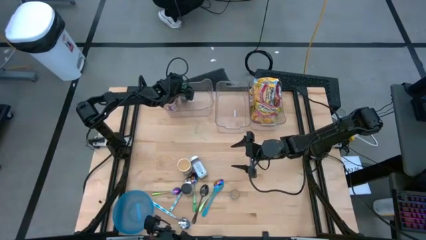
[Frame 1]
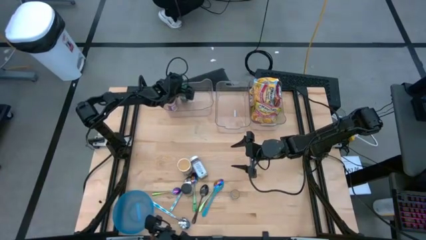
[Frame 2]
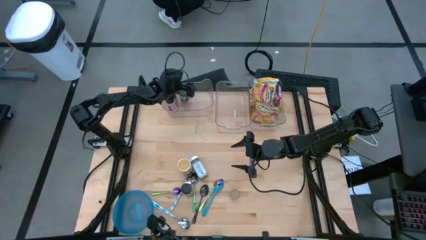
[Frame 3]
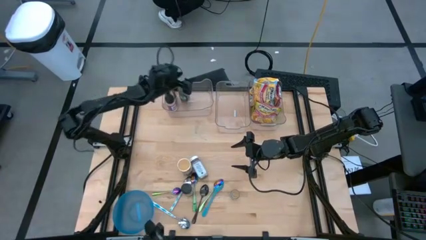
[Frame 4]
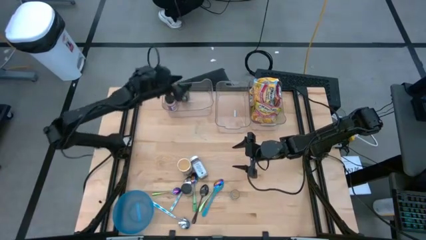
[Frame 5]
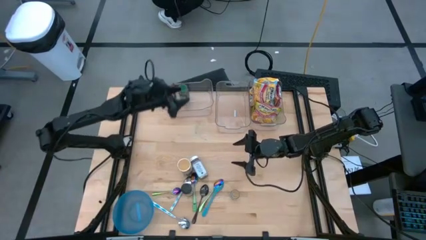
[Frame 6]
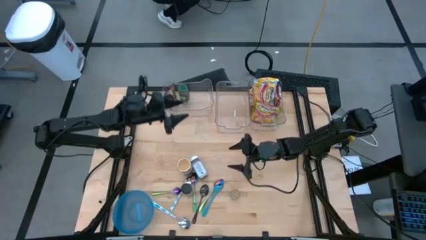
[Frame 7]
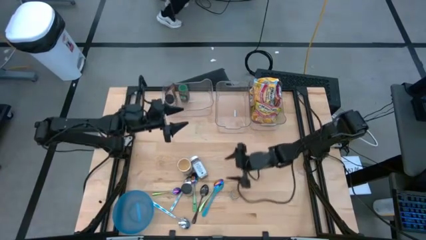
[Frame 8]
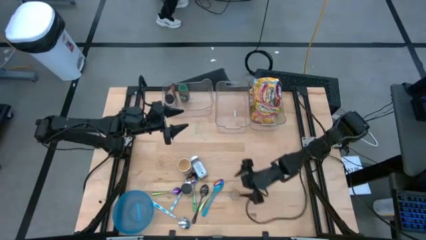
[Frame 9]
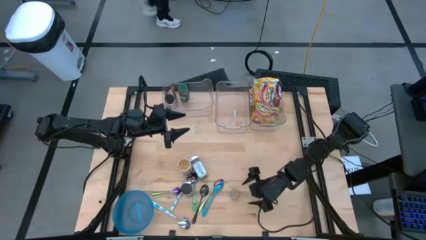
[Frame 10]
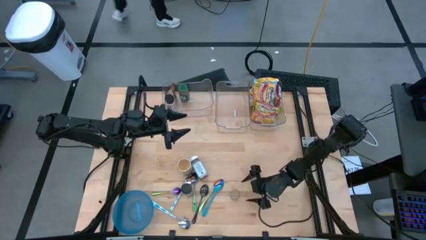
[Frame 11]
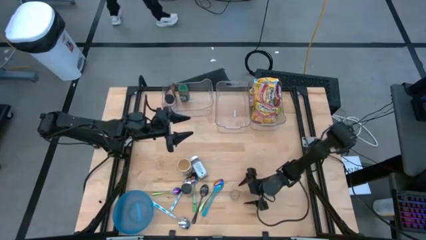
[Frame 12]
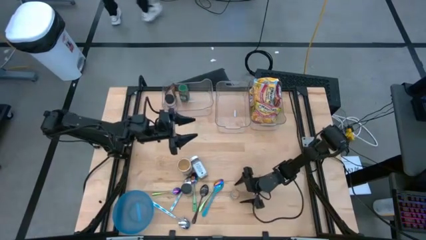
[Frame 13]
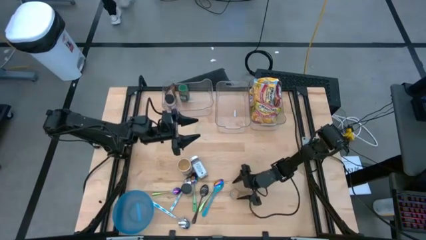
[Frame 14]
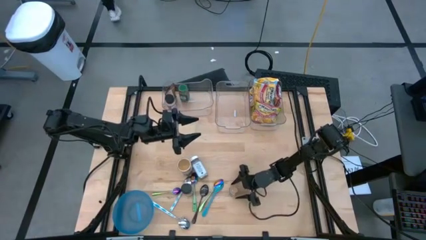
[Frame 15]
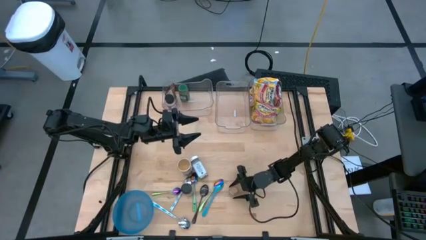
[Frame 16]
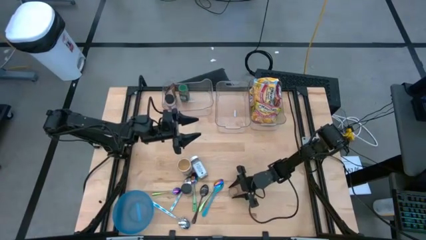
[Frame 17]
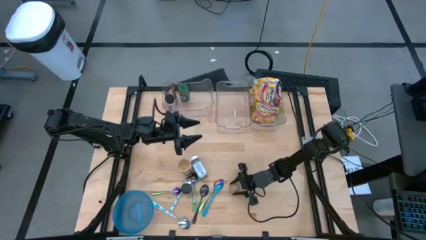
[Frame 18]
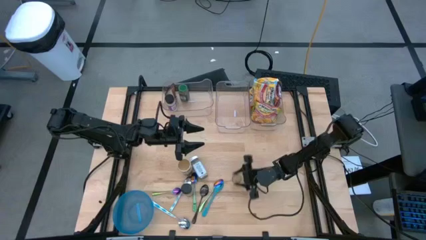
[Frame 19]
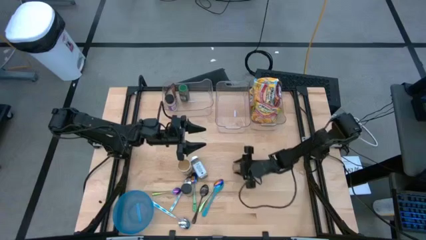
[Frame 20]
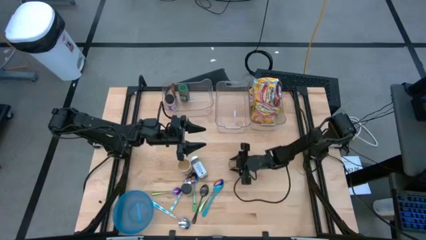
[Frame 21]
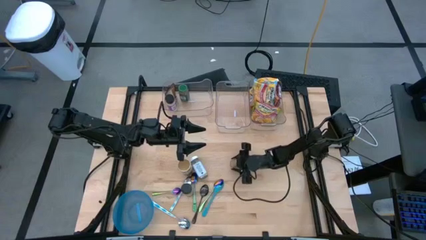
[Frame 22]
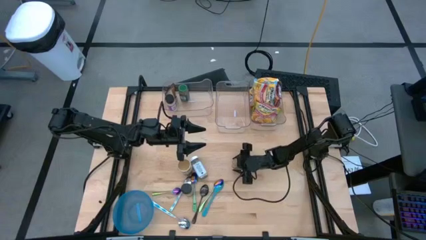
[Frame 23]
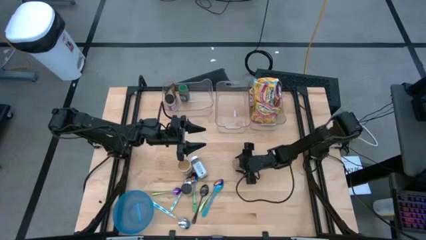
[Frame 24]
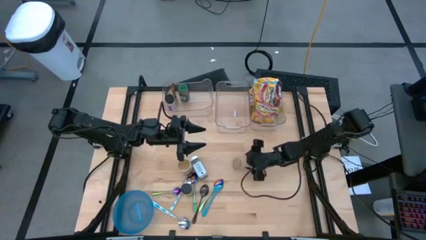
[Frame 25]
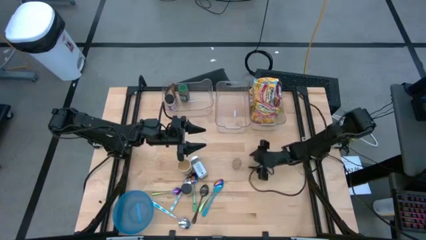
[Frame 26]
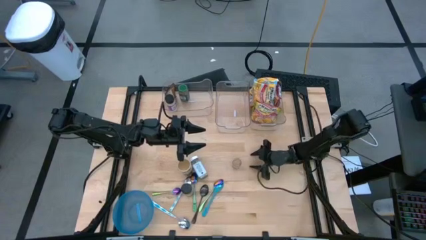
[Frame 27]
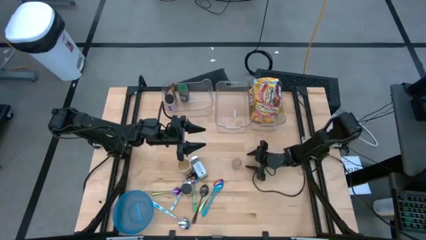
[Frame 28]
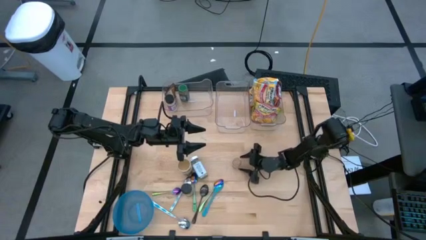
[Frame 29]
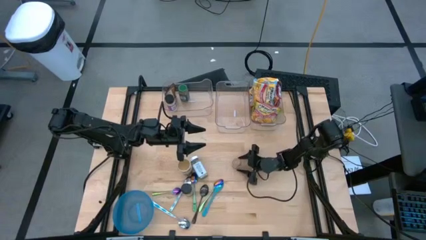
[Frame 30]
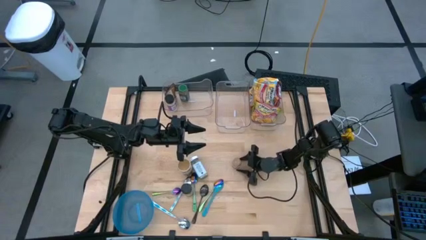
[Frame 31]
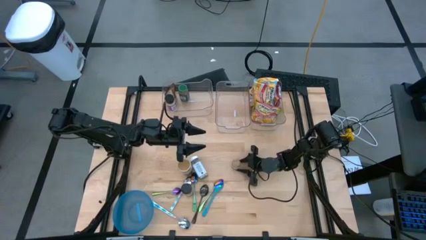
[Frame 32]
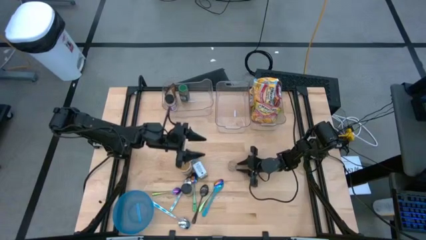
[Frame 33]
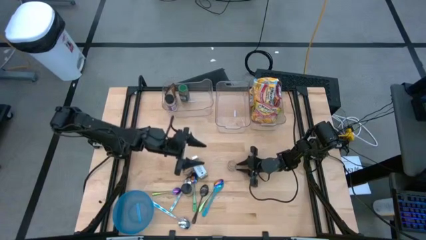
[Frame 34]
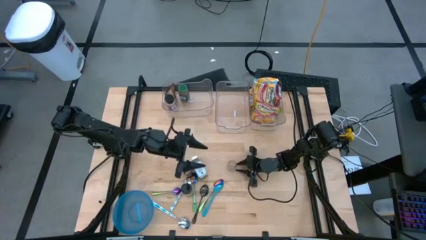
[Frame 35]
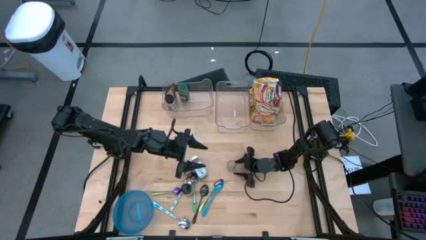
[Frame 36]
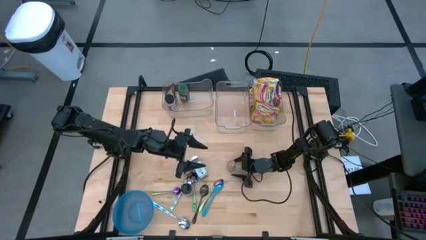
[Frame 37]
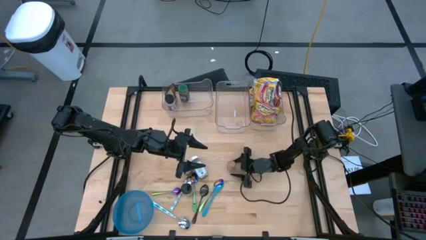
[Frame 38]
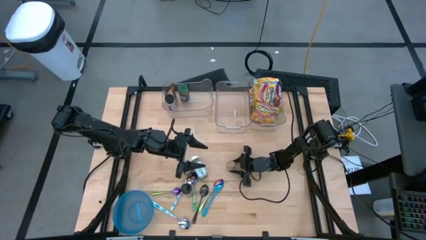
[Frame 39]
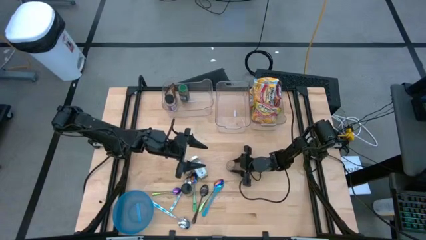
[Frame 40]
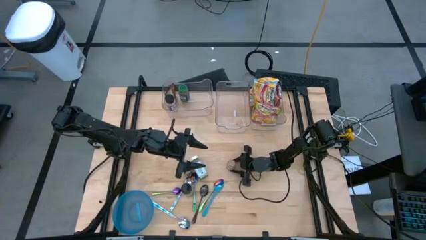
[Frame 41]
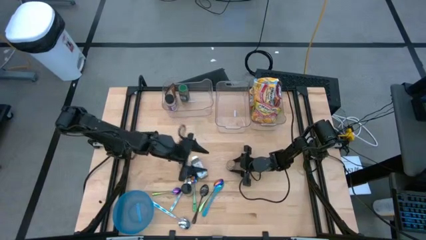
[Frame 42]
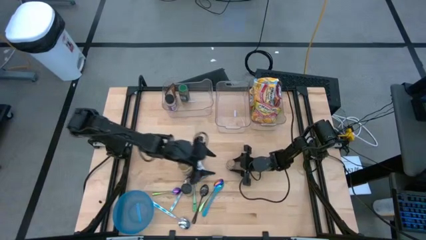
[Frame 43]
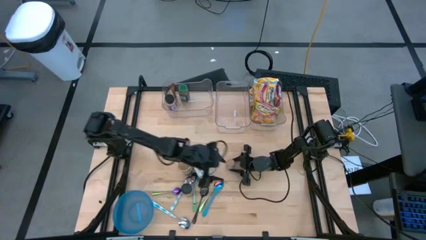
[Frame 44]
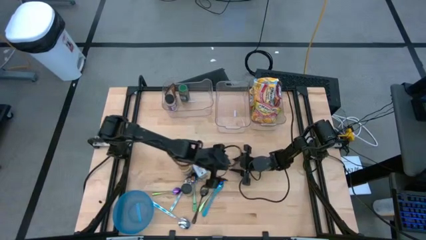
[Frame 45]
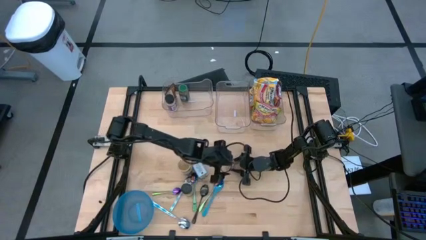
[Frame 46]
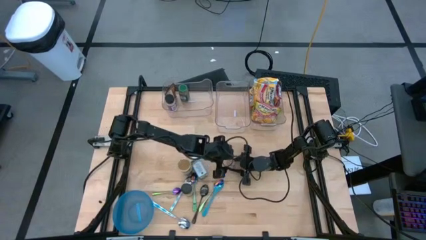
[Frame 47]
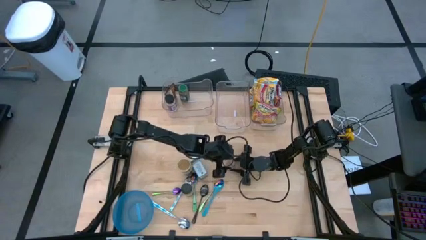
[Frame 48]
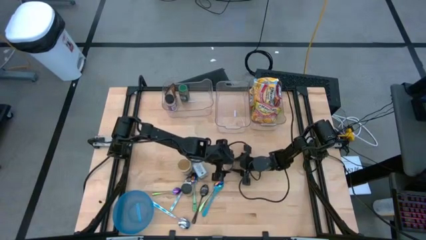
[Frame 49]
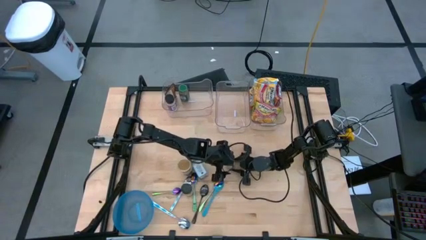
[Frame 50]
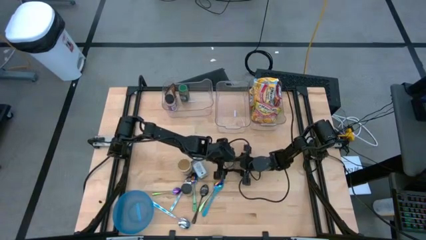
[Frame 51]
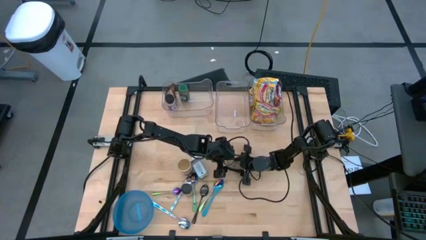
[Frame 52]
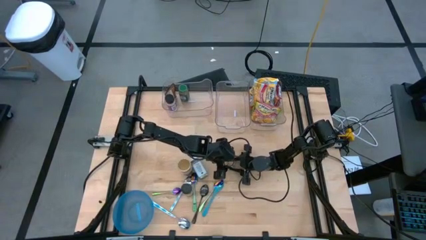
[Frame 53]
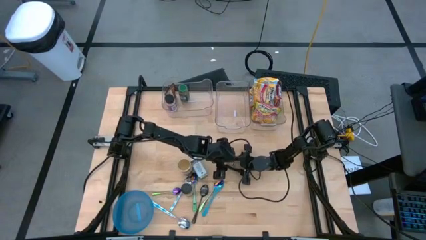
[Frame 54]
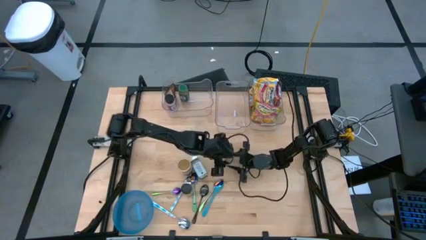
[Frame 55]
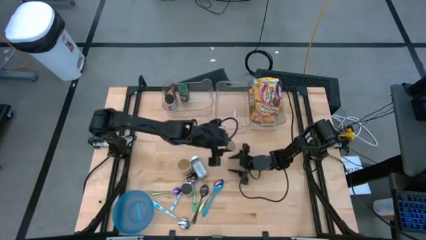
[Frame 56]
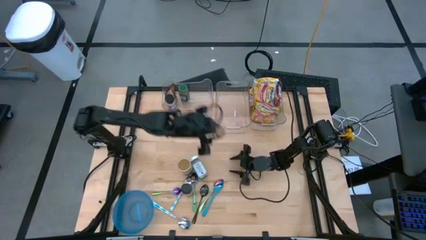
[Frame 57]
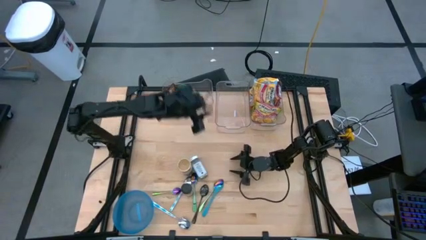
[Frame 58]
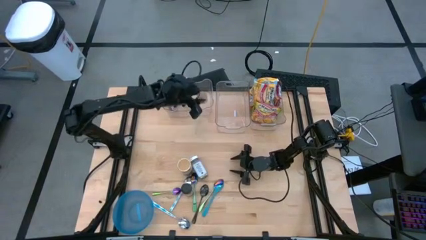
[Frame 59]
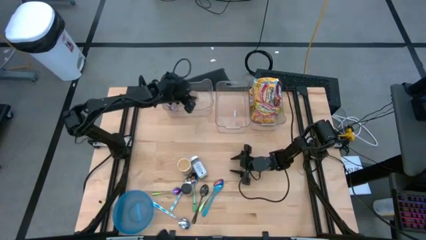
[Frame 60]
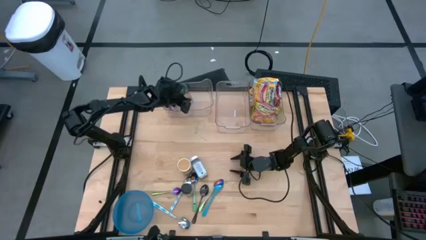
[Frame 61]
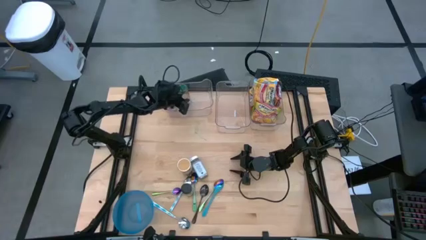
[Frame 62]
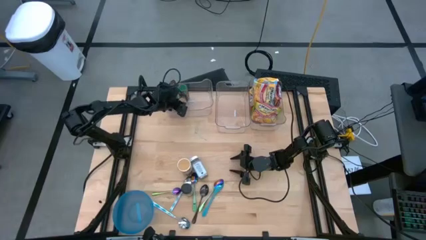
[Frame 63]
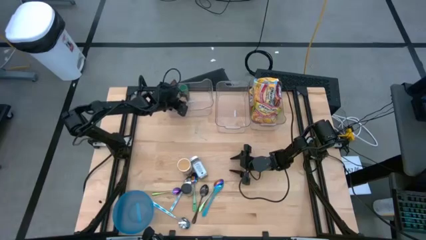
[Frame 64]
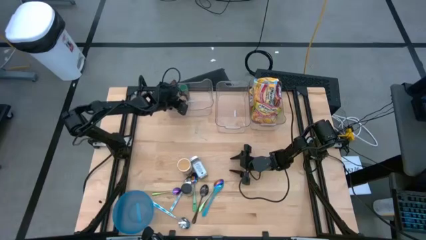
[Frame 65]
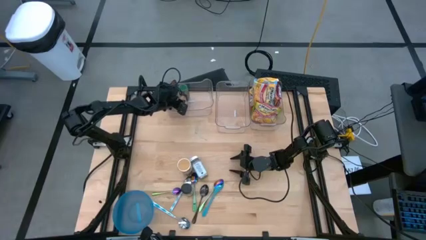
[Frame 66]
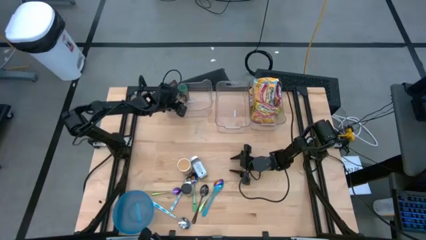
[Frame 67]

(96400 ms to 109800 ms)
Task: Pick & Place Food Item
Put the brown seasoning bottle into the left transparent bin
